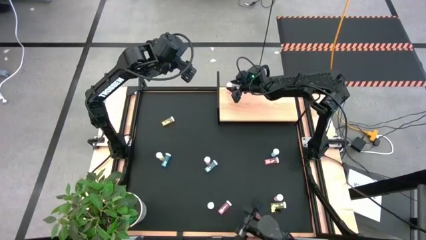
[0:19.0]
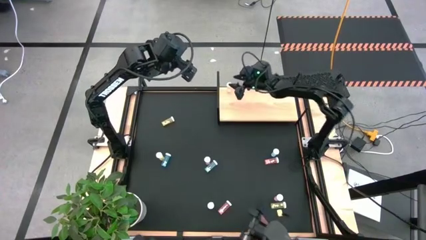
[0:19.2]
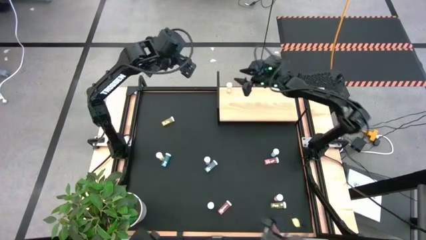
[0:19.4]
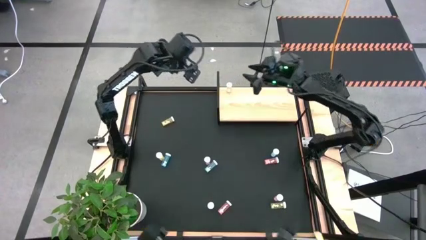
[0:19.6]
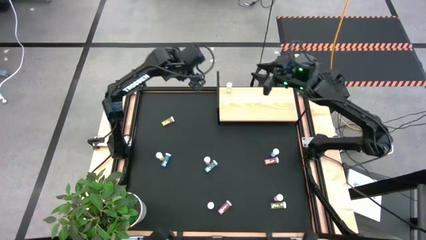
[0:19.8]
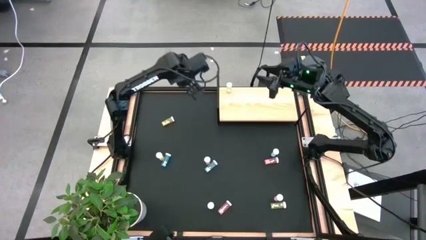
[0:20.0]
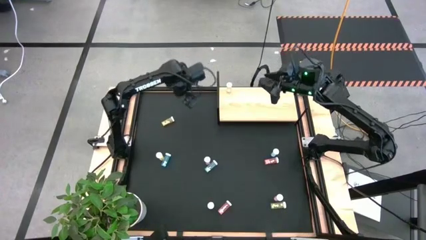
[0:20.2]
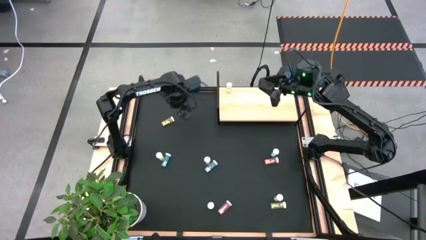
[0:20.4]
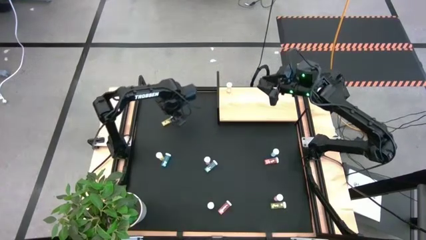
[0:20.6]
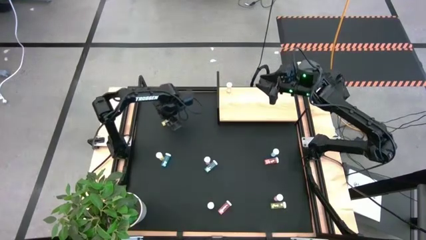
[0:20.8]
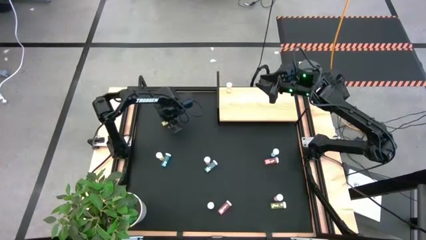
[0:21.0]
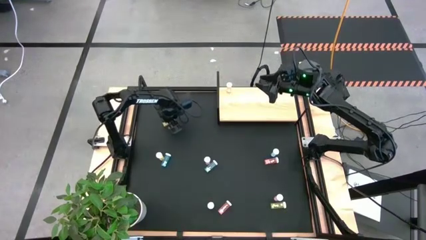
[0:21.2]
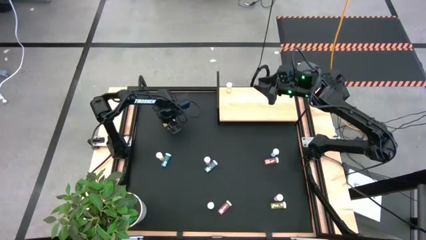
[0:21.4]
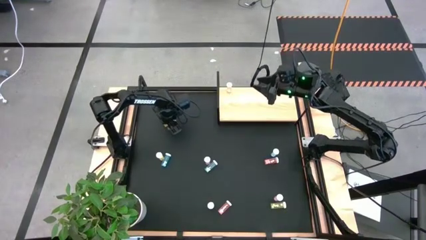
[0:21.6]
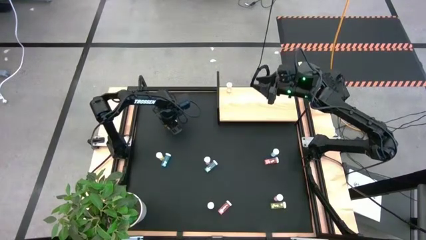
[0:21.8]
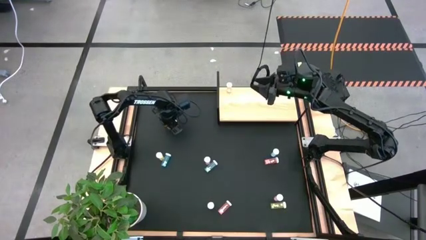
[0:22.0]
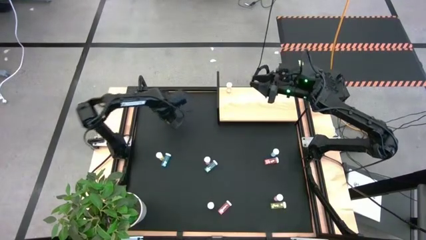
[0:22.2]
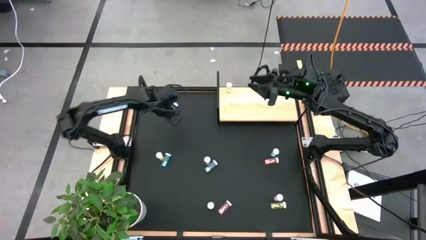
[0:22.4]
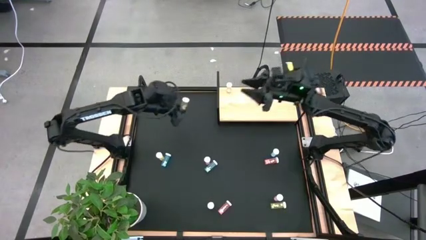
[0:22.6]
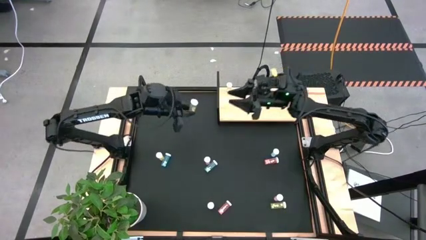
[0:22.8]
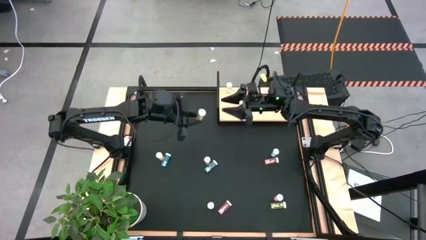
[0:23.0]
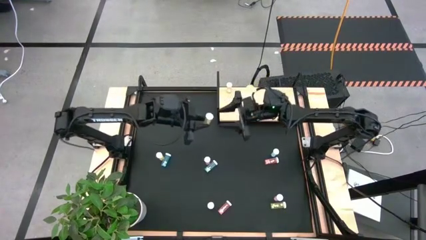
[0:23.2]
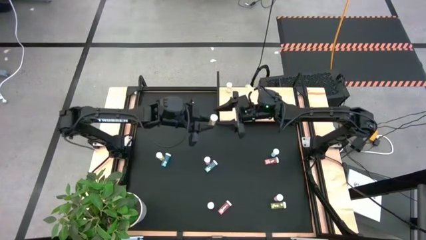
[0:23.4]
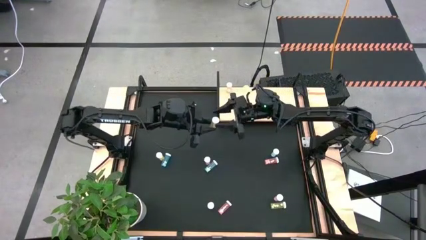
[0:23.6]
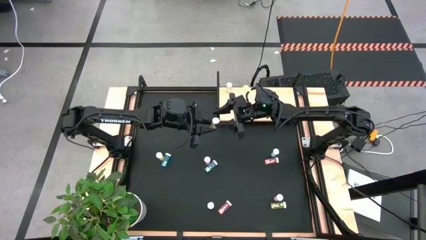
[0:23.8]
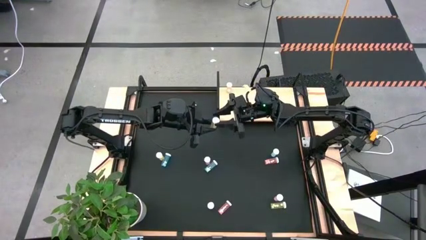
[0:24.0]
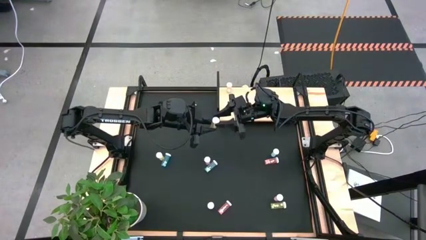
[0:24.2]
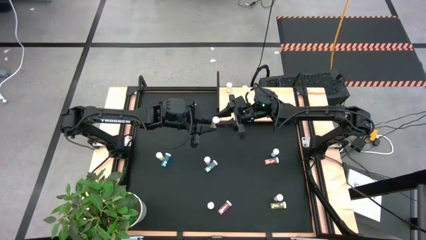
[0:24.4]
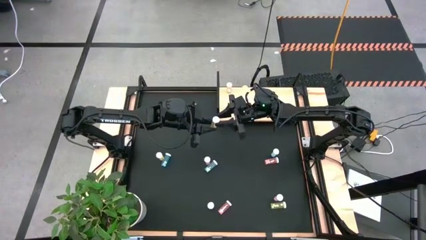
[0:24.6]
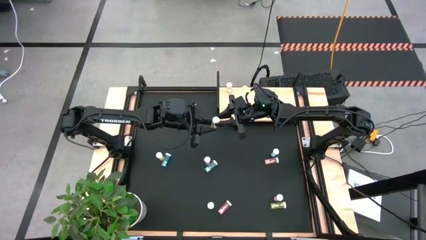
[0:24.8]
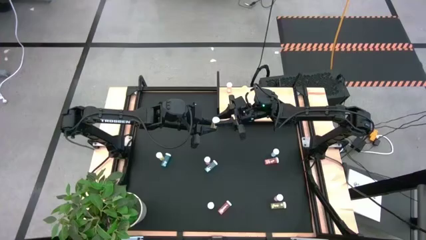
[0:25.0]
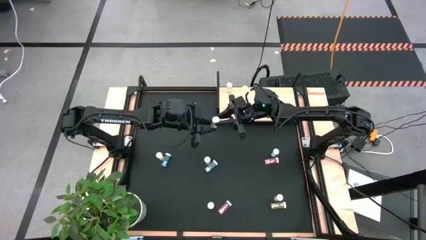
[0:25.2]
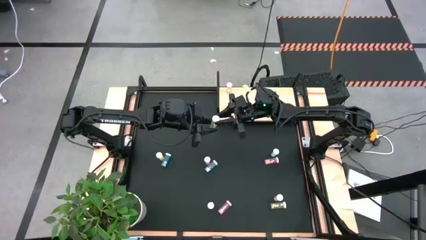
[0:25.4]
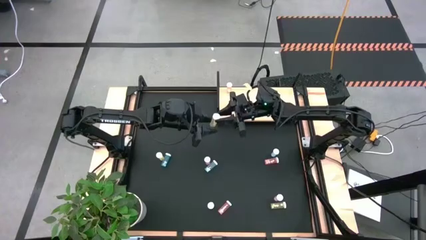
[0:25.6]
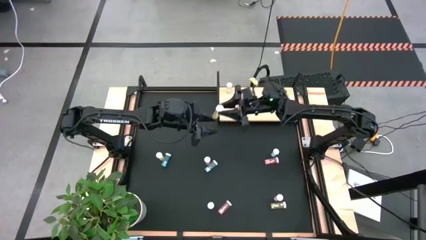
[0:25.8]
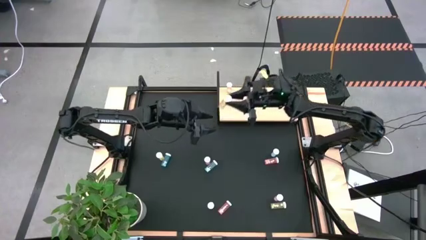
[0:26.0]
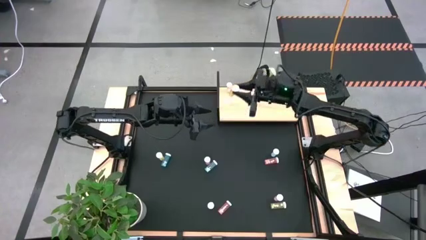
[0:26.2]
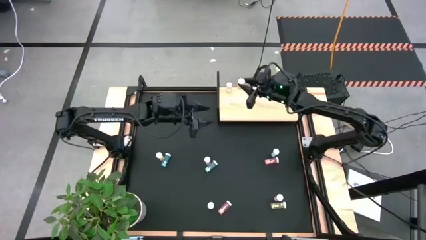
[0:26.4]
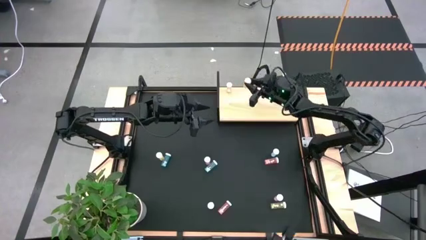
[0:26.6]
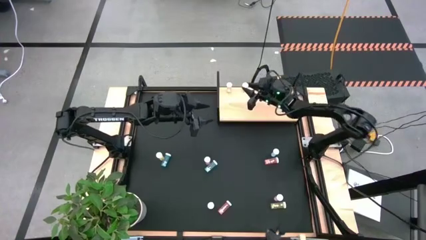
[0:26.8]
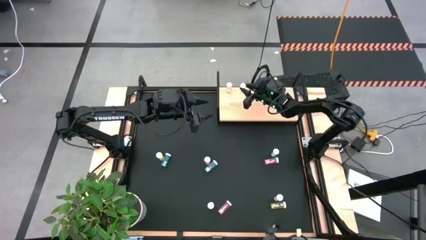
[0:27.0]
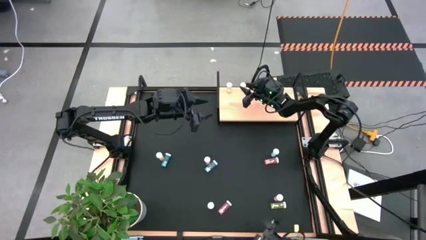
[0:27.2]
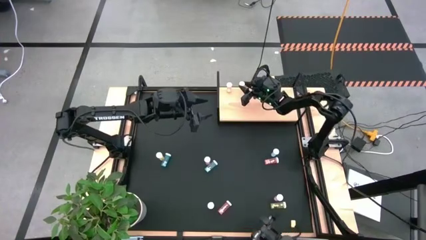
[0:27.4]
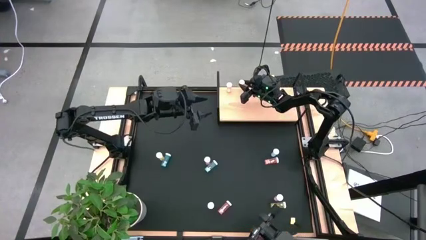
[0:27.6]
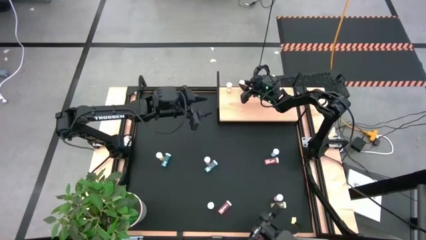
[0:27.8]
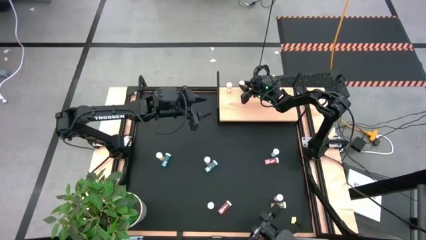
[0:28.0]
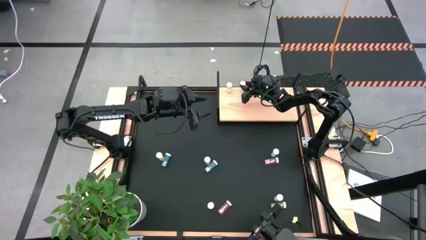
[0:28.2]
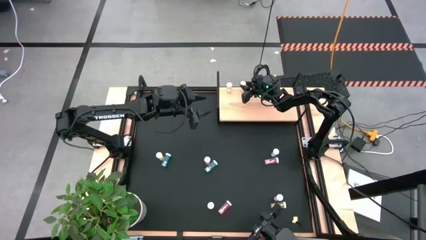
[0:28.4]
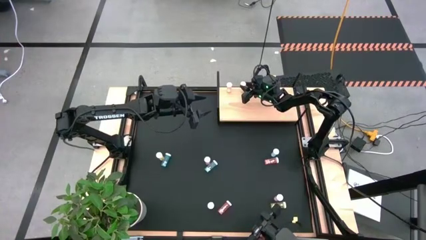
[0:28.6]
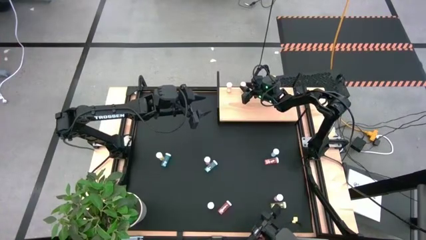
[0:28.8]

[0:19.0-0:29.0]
Task: Pick and place medicine bottles onto shelf by color
Put the top yellow pill bottle on the shelf

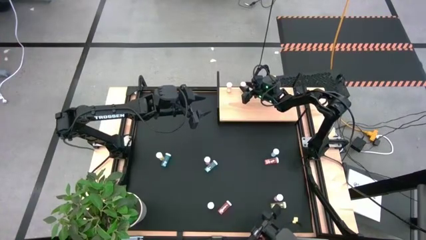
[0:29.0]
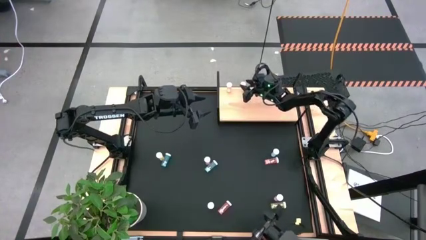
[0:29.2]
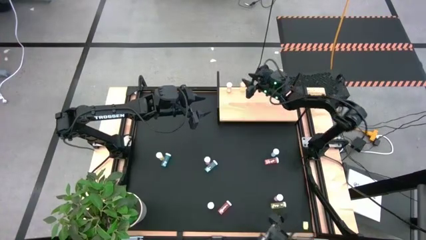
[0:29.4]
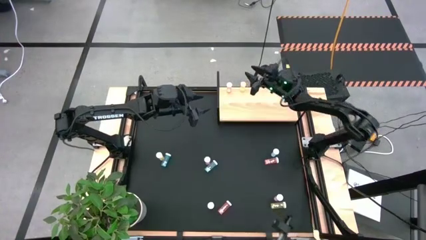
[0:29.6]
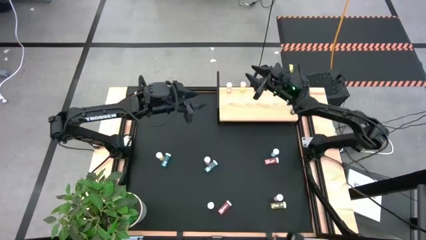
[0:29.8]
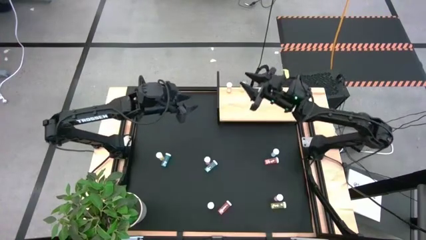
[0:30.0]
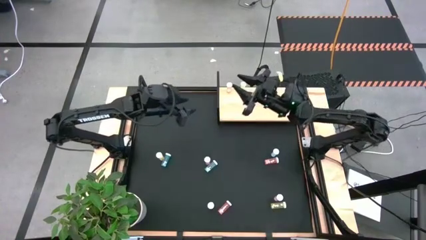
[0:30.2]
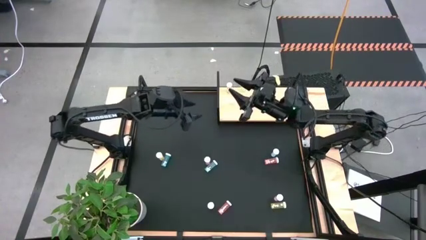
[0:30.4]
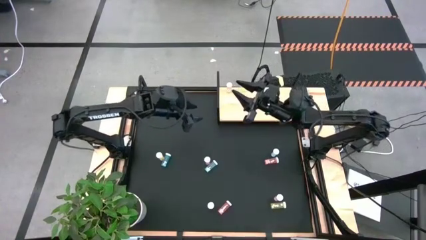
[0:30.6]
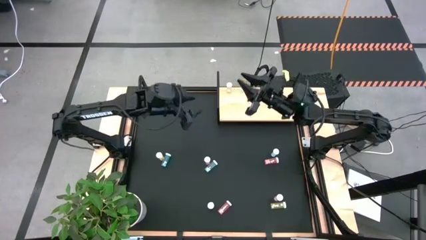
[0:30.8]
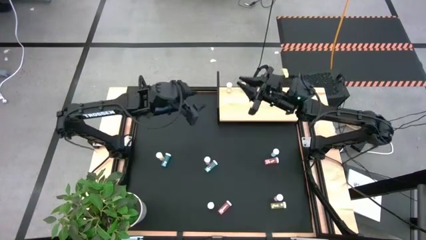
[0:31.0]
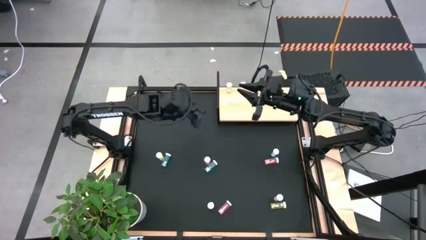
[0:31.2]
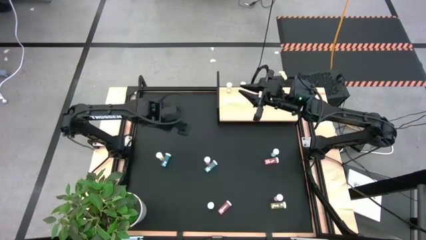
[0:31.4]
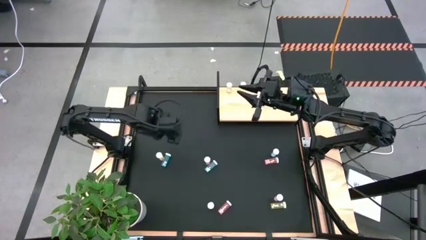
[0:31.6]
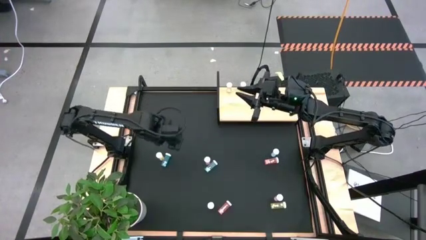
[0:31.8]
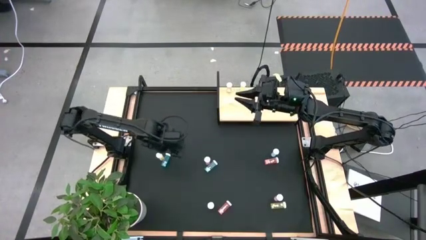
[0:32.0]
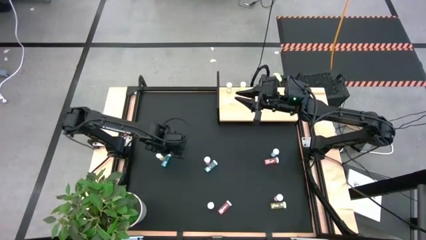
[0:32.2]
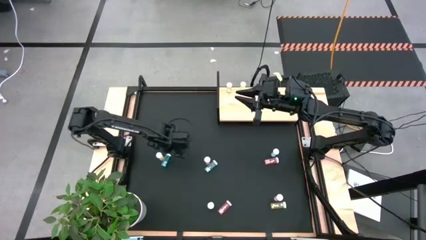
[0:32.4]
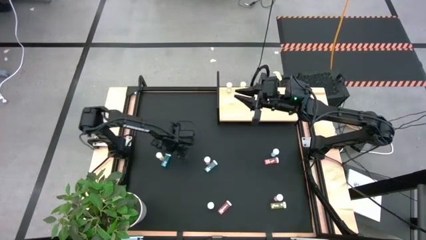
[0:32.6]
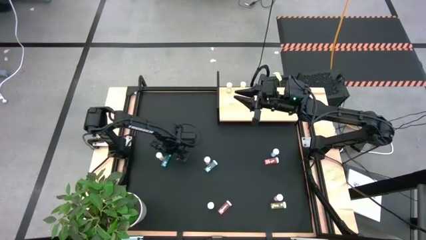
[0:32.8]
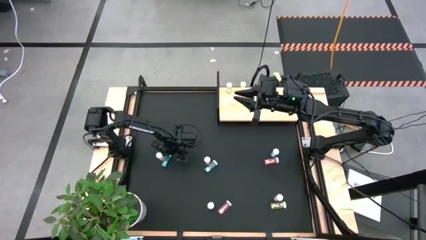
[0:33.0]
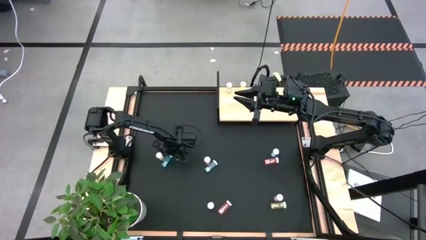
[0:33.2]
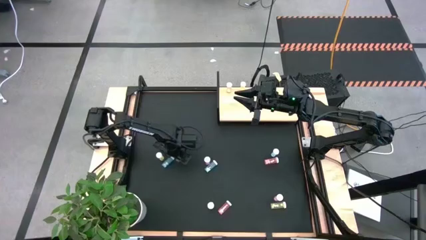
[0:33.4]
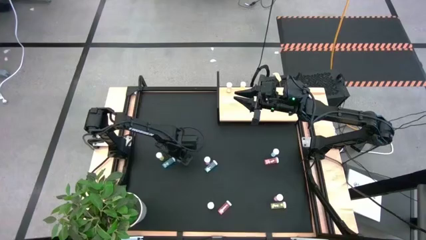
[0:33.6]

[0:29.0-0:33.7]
Put the left blue pill bottle on the shelf
